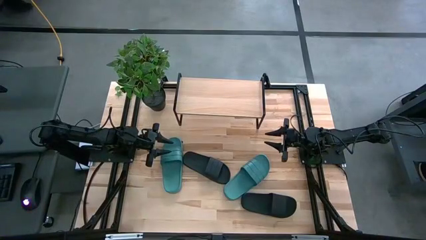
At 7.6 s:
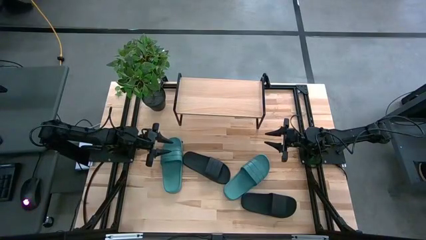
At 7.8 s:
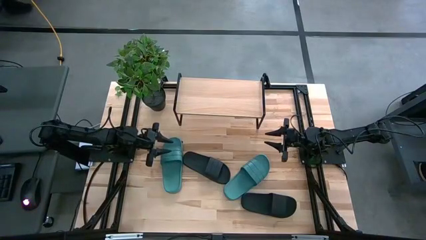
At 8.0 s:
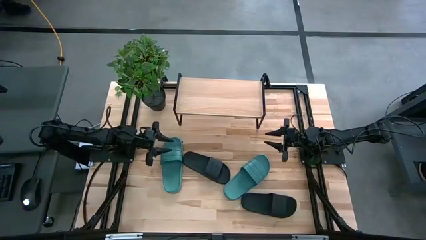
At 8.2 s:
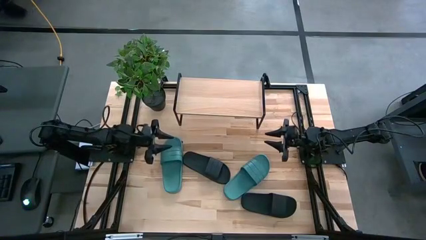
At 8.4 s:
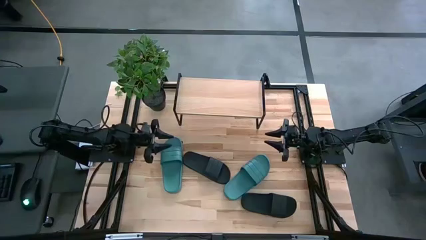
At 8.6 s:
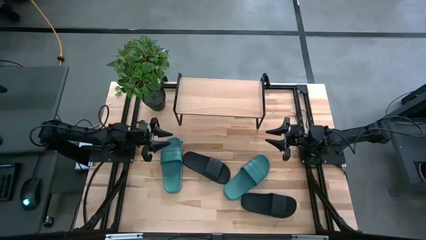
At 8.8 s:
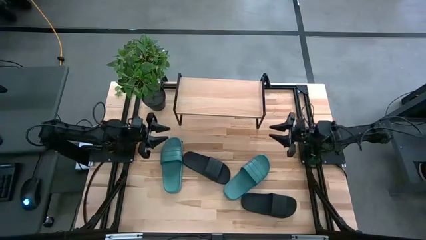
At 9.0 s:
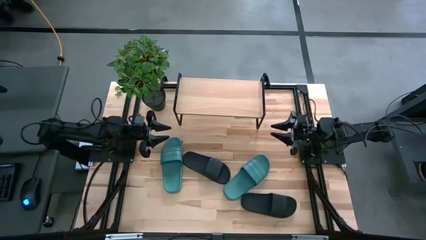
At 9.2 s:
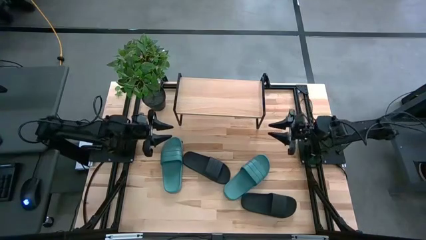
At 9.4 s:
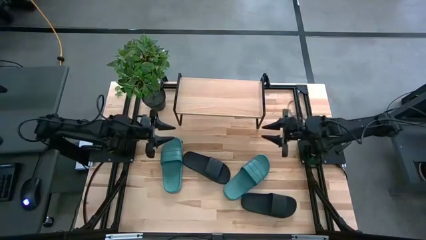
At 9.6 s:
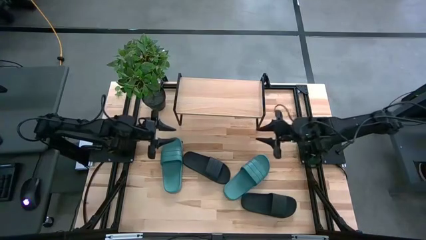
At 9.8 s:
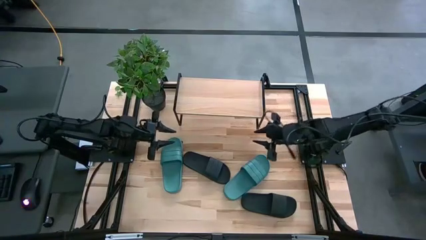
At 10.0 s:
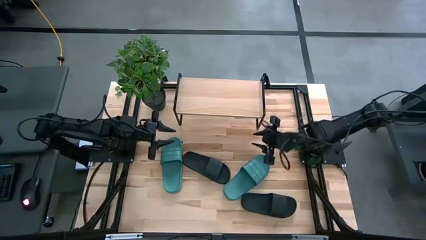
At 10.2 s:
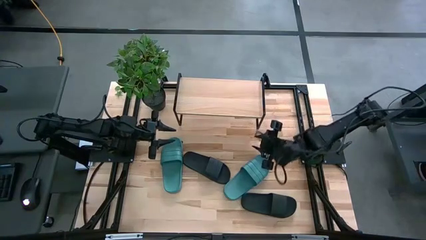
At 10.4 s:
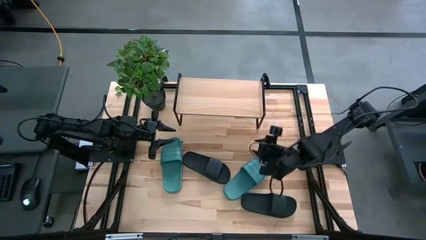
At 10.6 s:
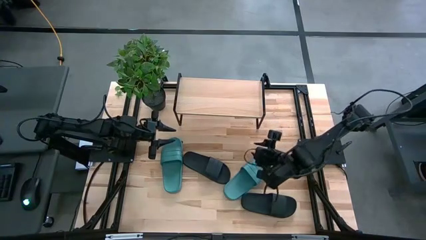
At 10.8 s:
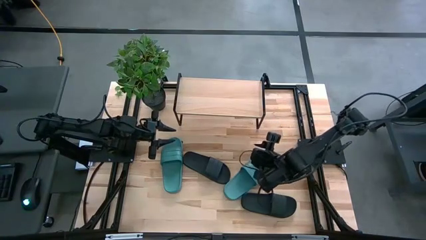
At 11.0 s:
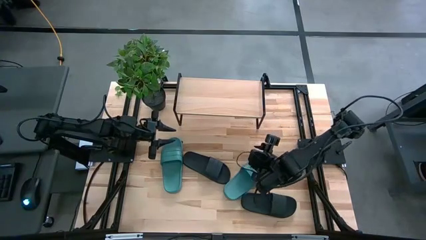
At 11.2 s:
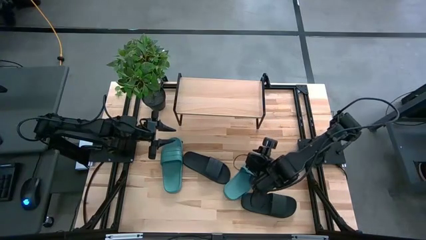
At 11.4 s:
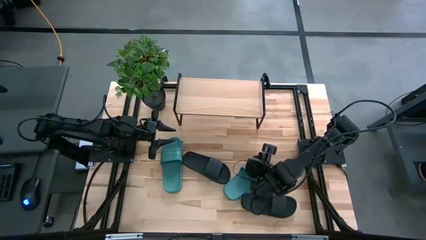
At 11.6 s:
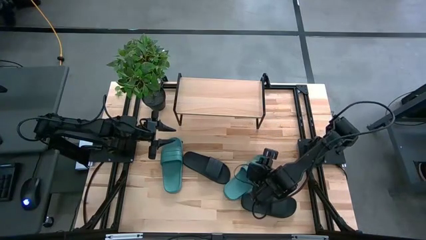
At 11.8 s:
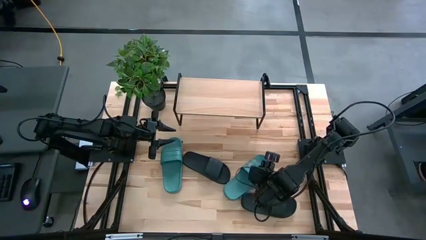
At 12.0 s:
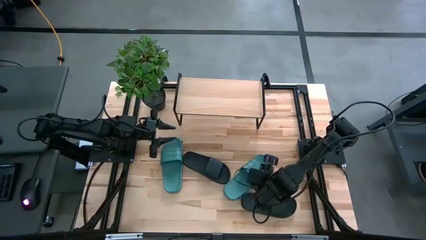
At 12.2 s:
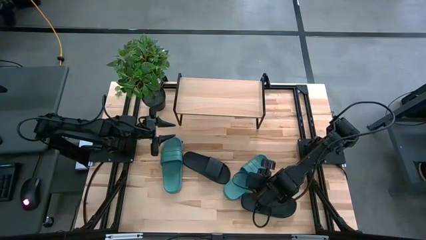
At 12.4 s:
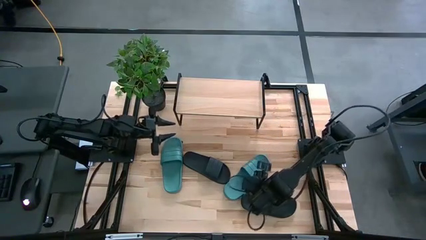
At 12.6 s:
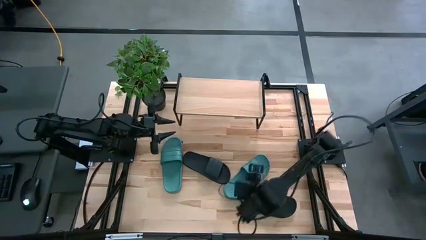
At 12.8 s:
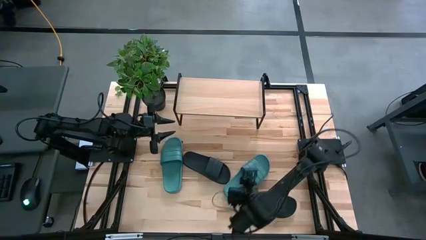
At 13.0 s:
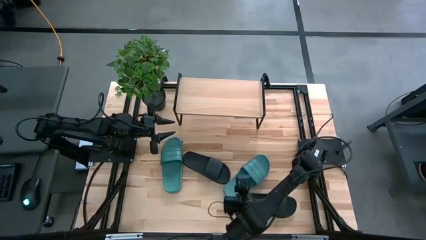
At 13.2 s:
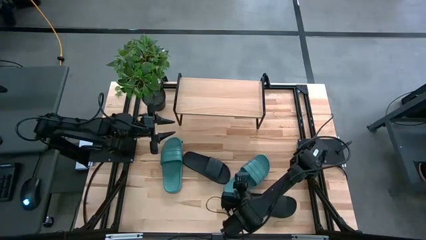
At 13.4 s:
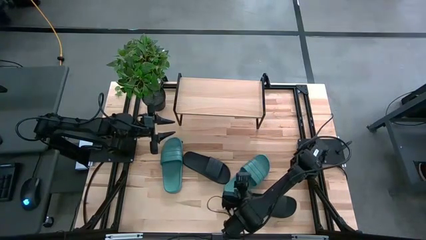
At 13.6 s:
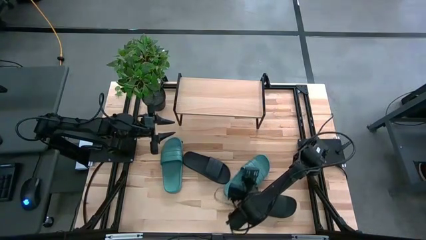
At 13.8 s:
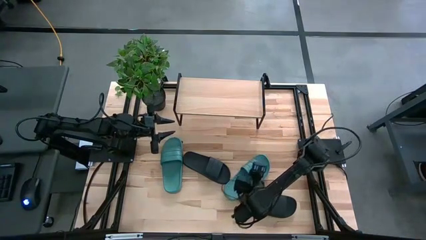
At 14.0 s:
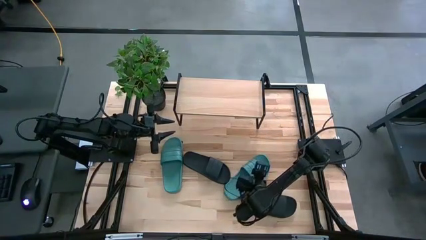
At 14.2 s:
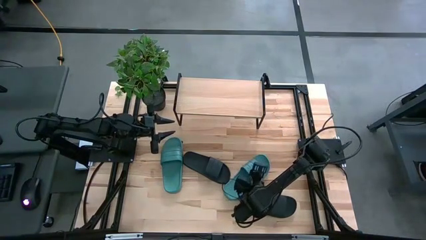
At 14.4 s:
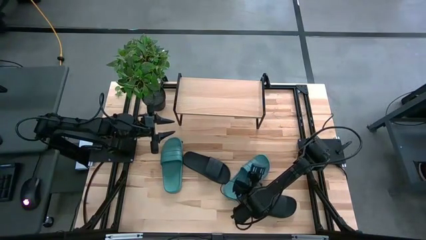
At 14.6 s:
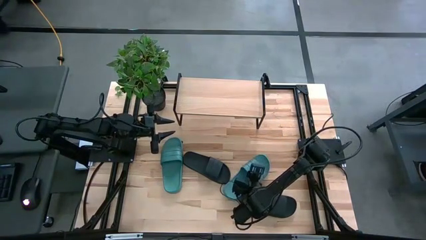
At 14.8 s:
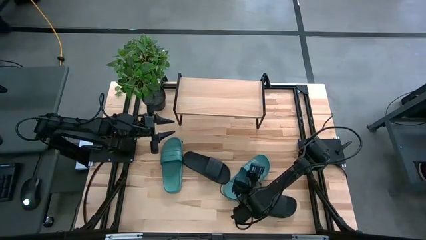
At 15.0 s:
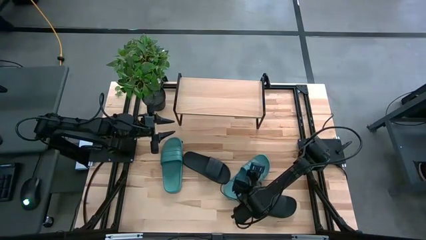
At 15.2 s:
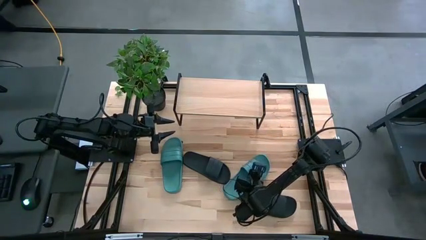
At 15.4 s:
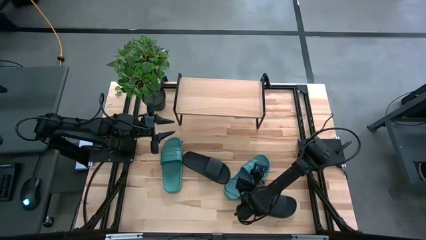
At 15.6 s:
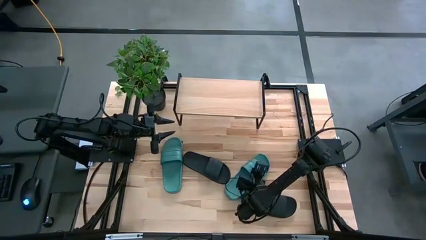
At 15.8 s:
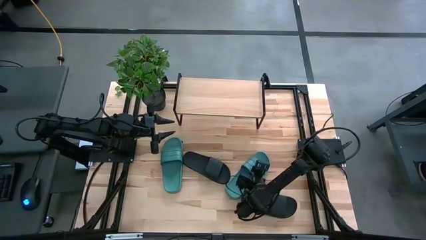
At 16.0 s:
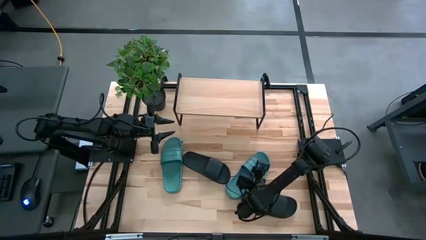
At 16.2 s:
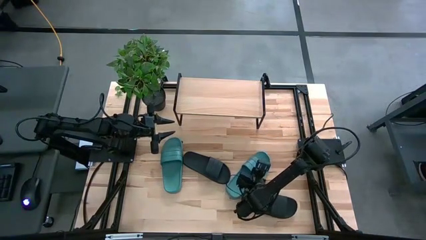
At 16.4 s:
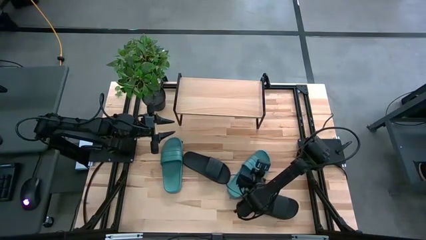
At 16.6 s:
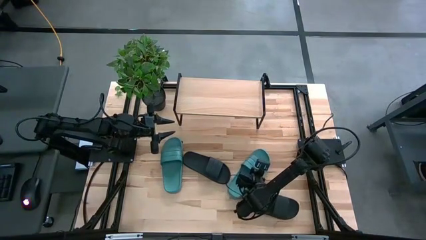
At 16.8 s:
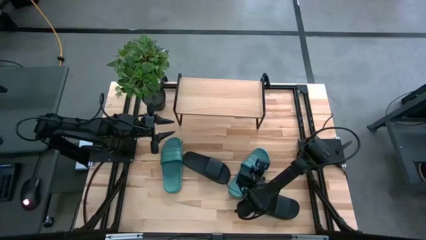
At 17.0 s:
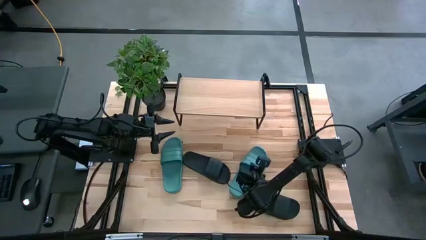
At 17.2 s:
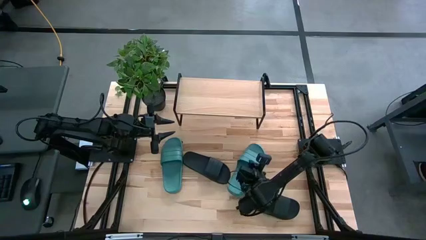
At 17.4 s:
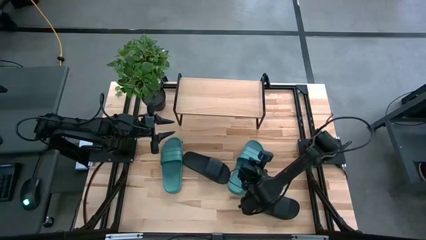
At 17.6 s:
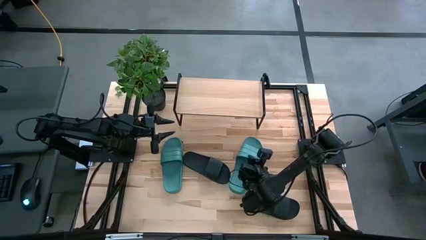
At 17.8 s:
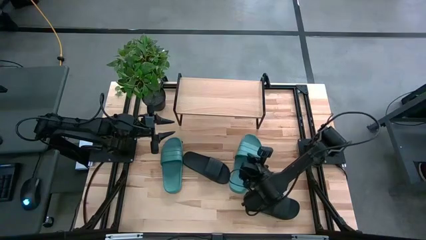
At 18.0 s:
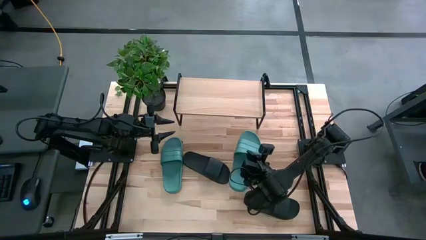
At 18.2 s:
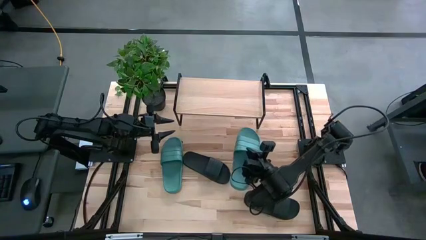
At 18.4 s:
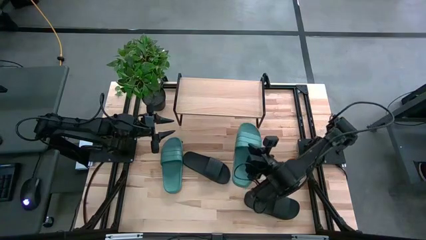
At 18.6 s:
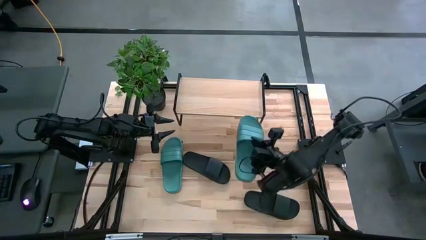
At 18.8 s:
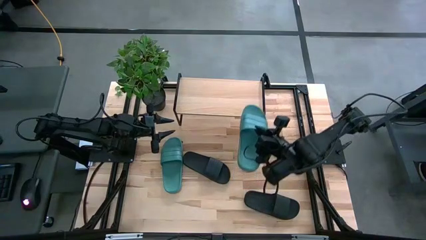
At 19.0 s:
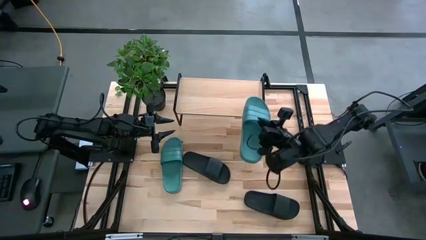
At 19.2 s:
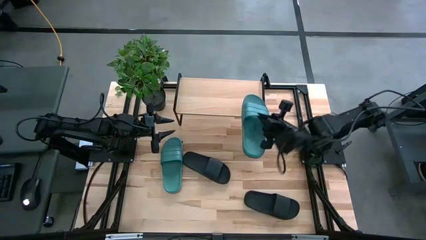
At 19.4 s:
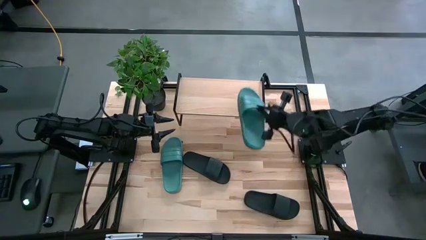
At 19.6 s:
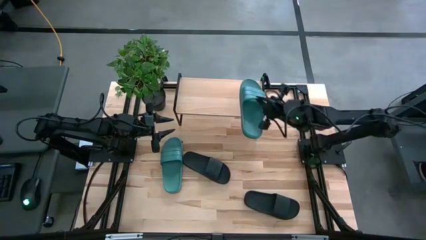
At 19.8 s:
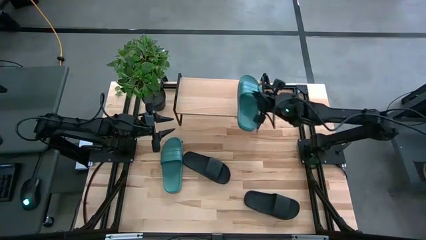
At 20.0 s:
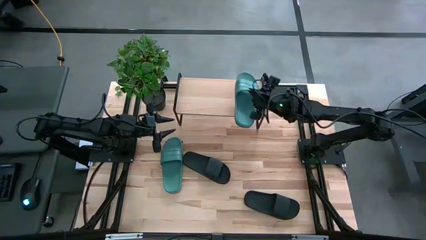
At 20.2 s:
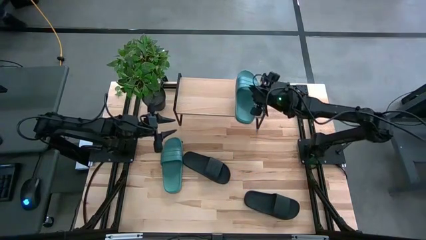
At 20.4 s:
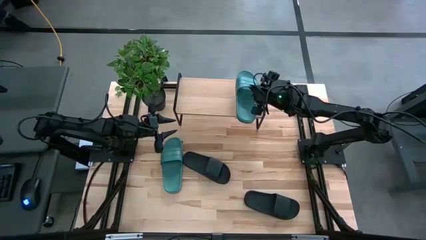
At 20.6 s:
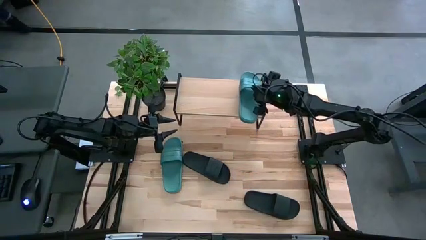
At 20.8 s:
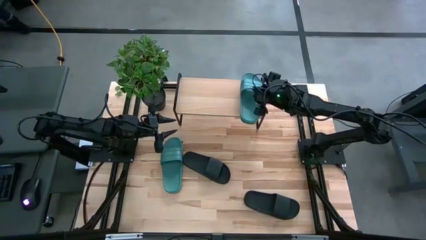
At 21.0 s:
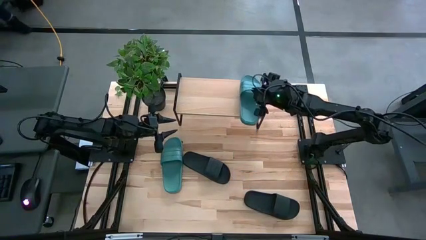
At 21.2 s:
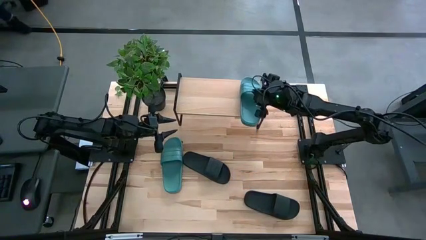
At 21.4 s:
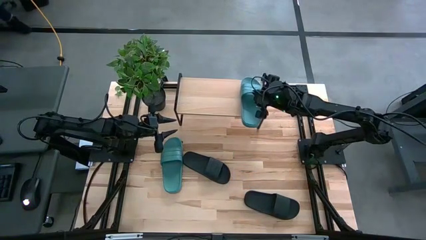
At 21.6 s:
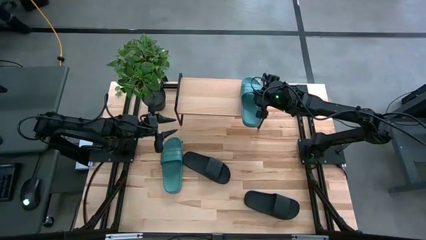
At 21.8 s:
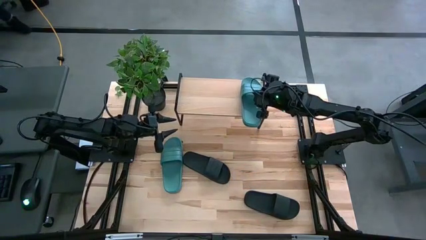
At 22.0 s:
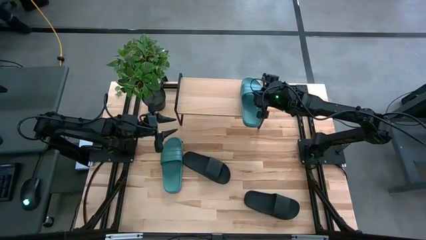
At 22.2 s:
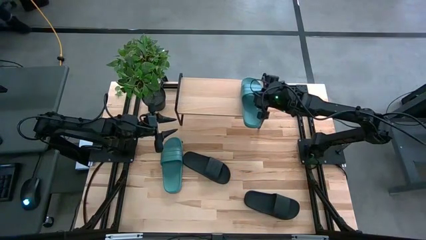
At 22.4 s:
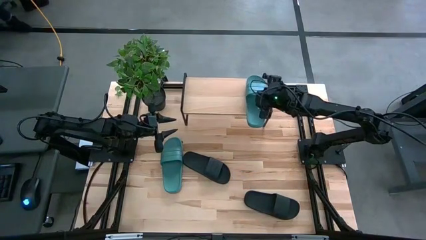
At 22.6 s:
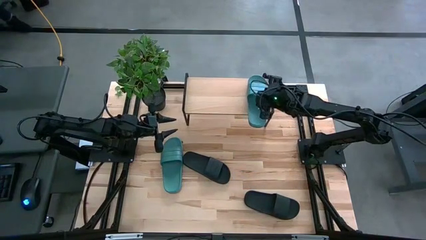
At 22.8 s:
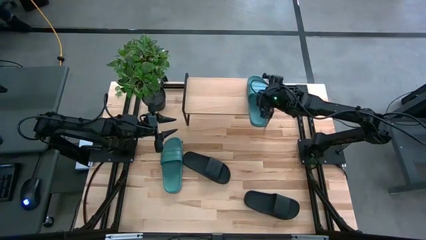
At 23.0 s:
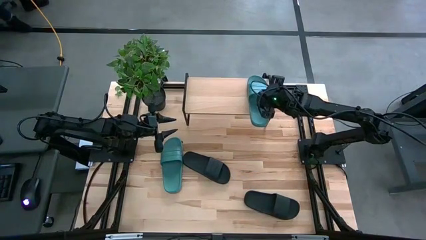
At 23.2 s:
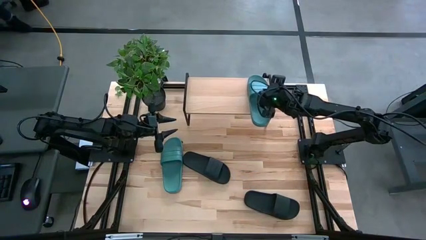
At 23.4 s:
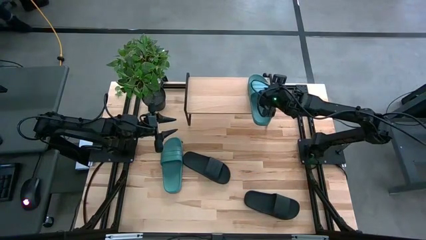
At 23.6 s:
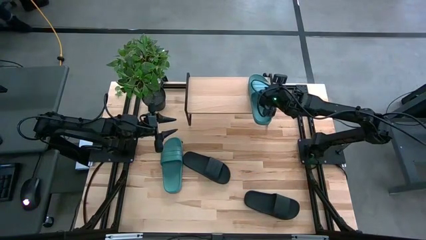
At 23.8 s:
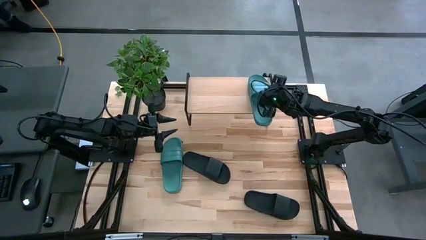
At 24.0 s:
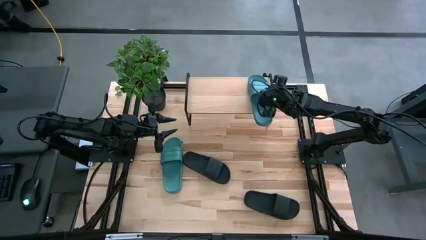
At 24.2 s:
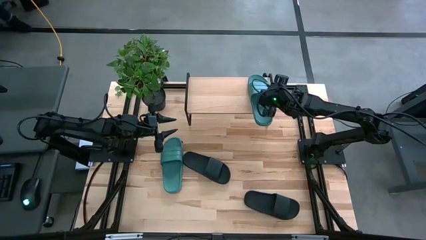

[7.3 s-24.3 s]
Task: Pick and place slides into the shelf
Put the right green slide on the shelf
